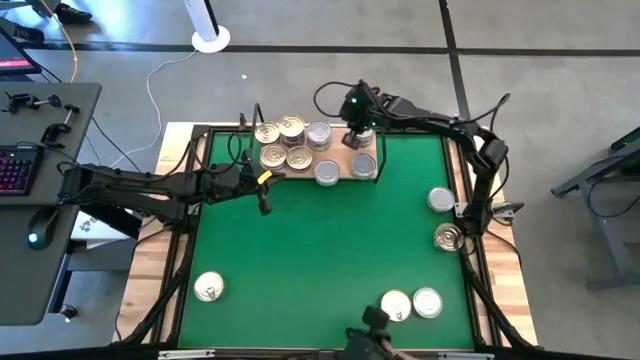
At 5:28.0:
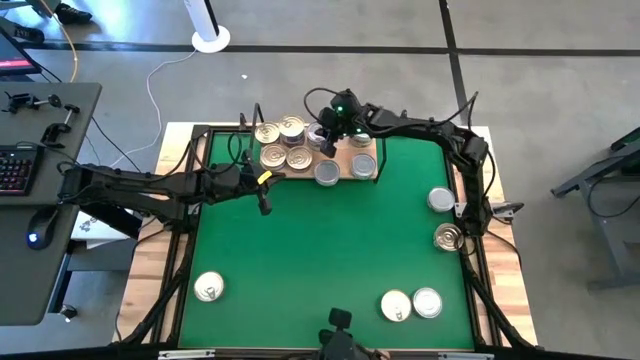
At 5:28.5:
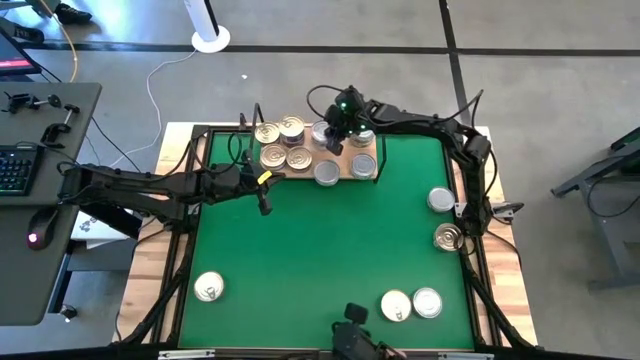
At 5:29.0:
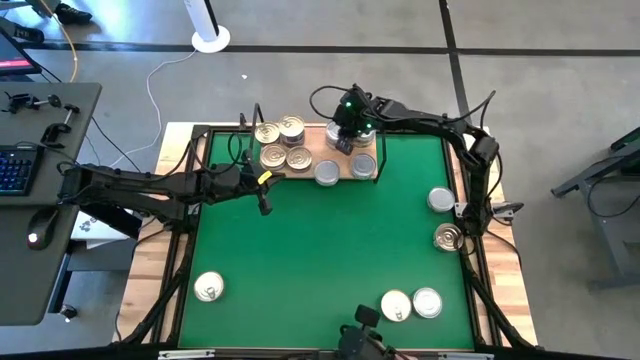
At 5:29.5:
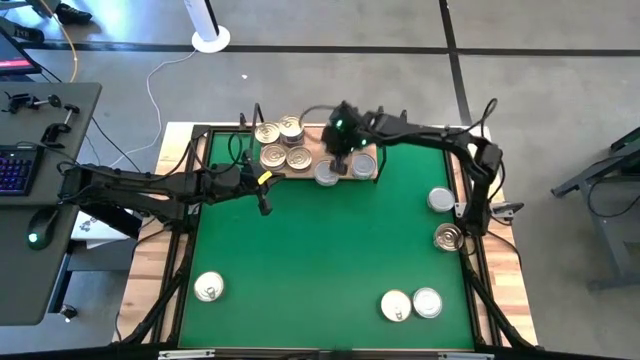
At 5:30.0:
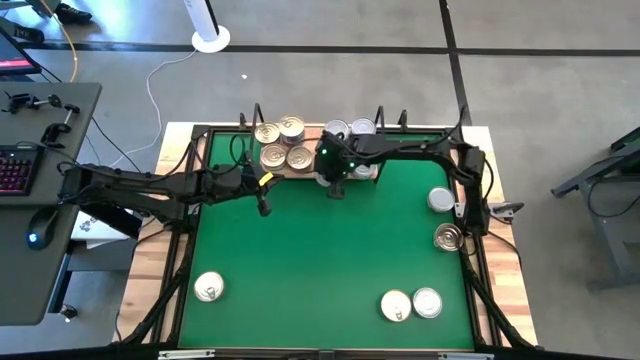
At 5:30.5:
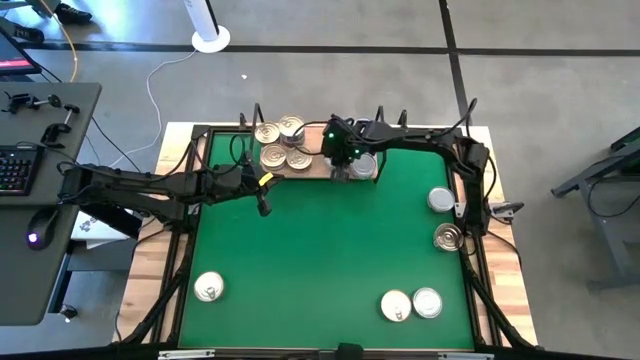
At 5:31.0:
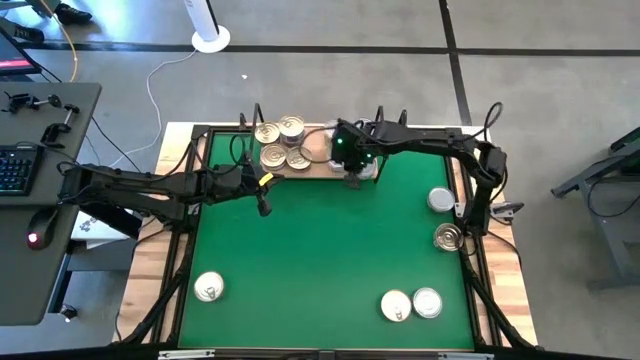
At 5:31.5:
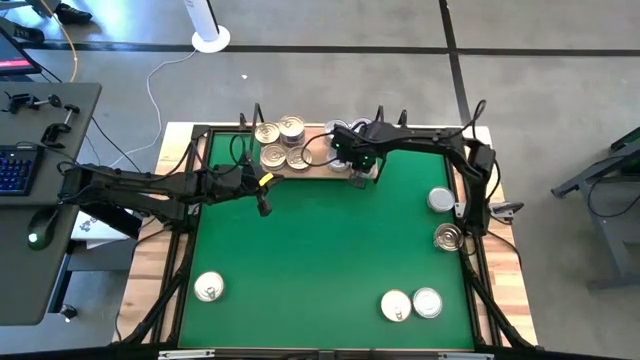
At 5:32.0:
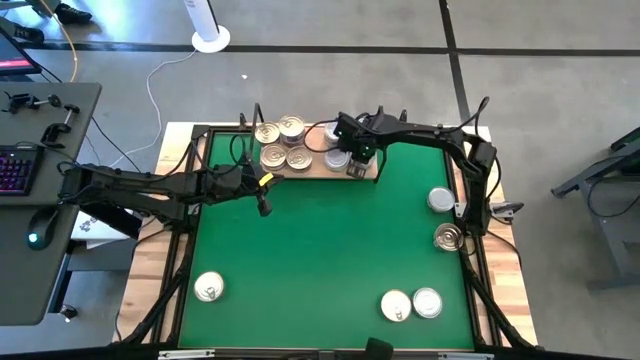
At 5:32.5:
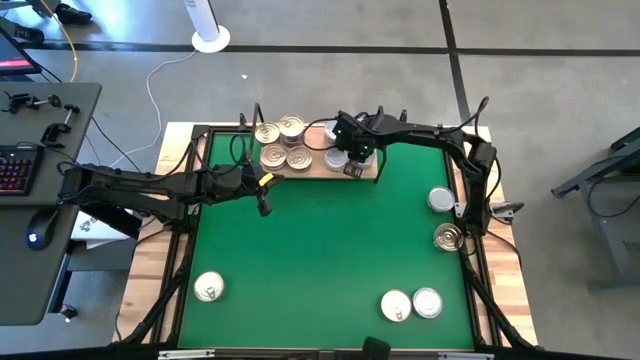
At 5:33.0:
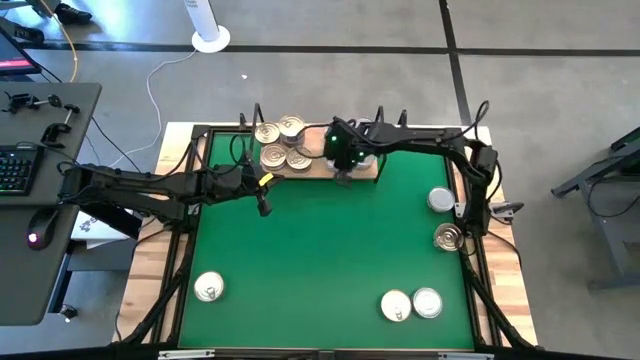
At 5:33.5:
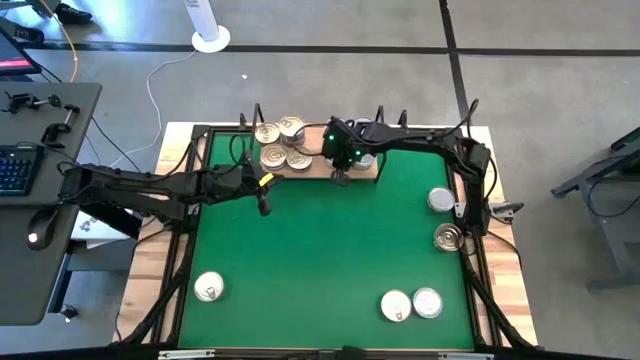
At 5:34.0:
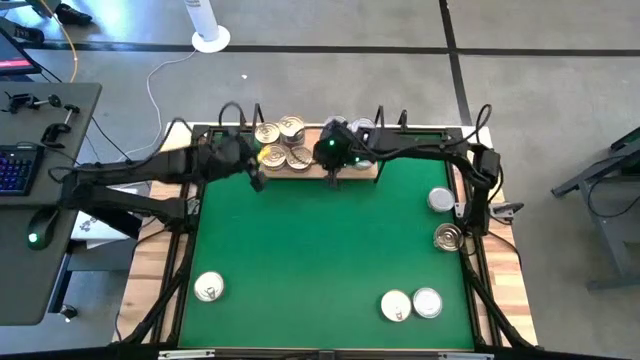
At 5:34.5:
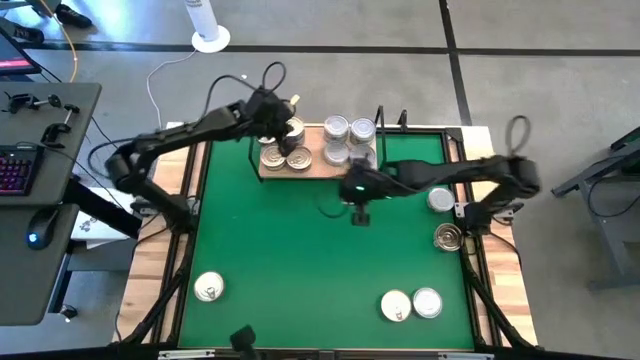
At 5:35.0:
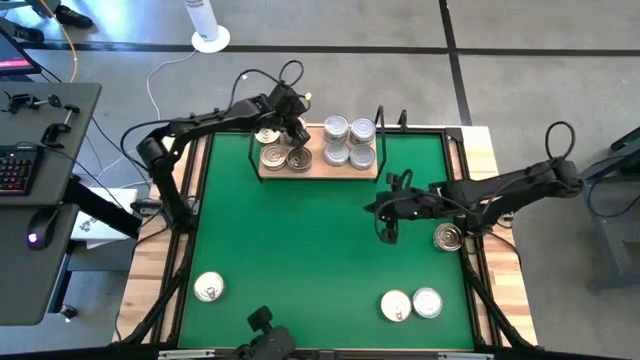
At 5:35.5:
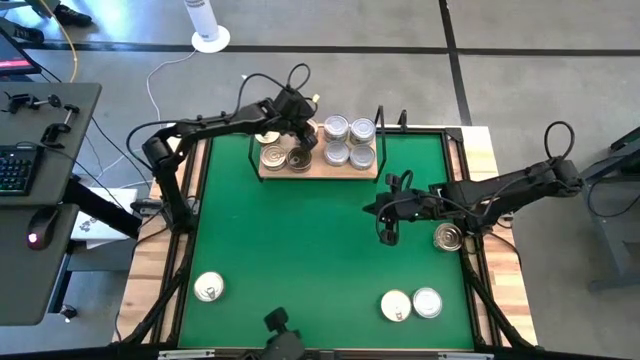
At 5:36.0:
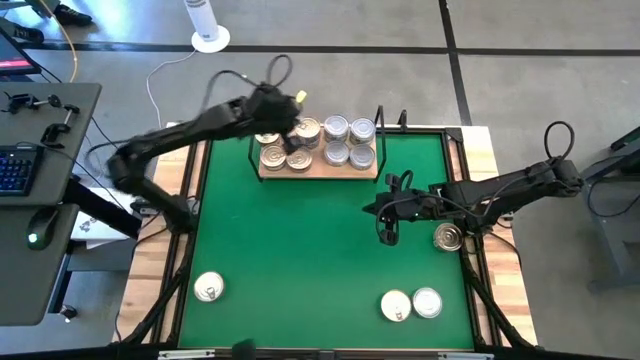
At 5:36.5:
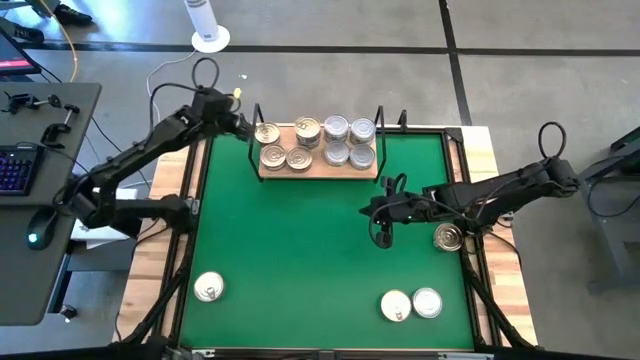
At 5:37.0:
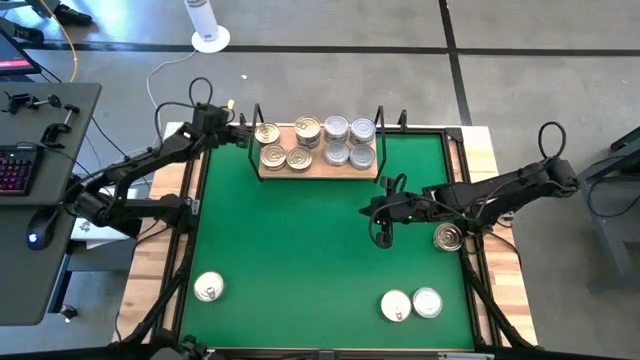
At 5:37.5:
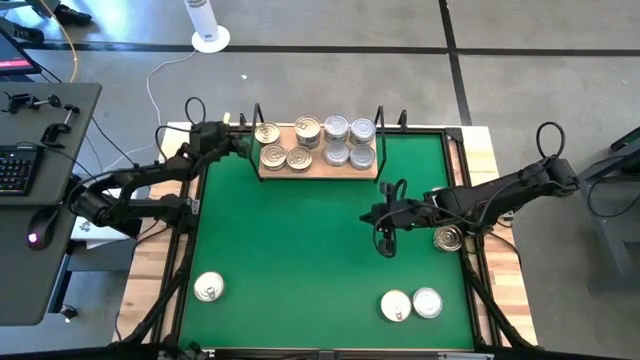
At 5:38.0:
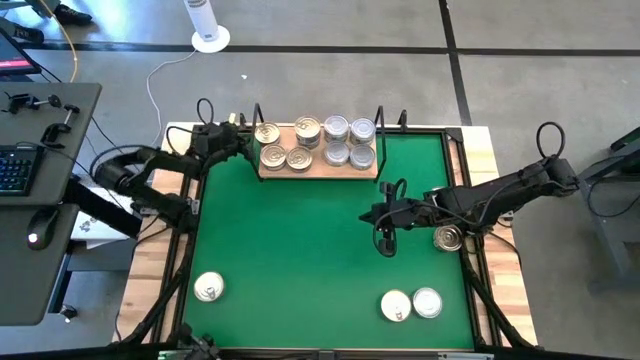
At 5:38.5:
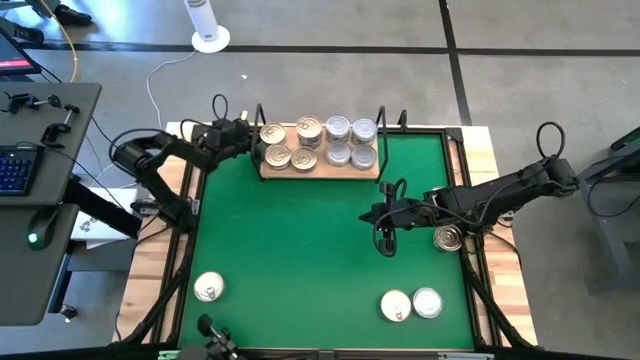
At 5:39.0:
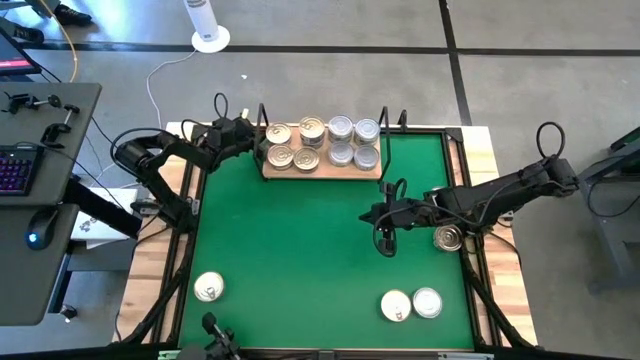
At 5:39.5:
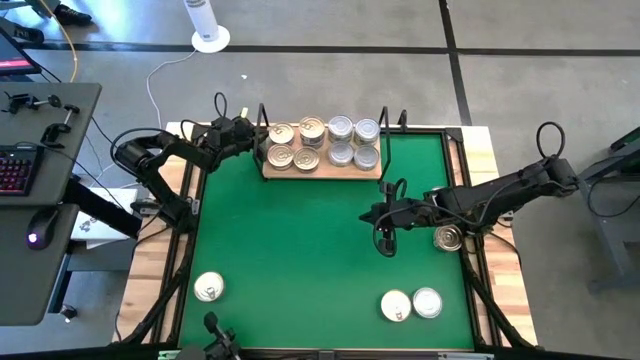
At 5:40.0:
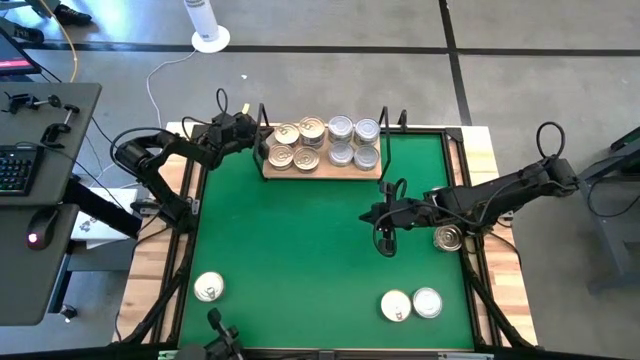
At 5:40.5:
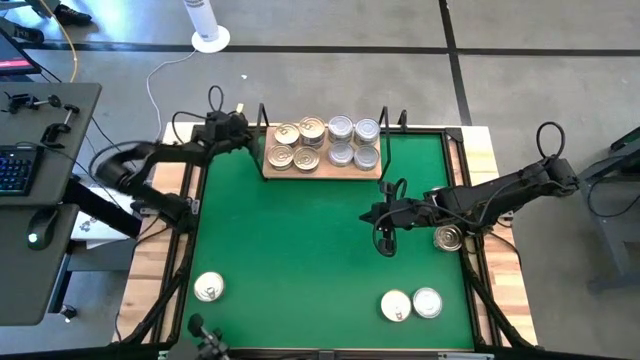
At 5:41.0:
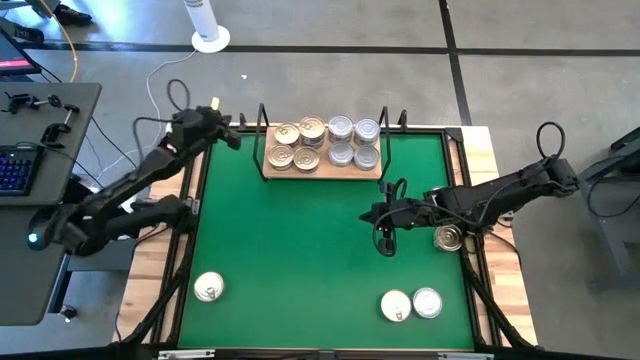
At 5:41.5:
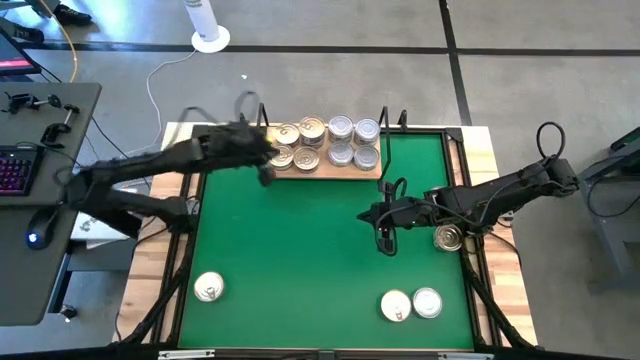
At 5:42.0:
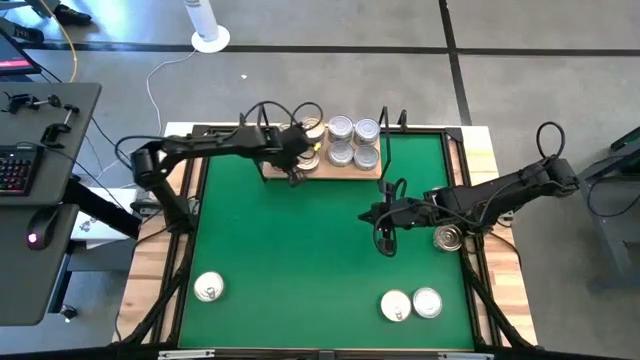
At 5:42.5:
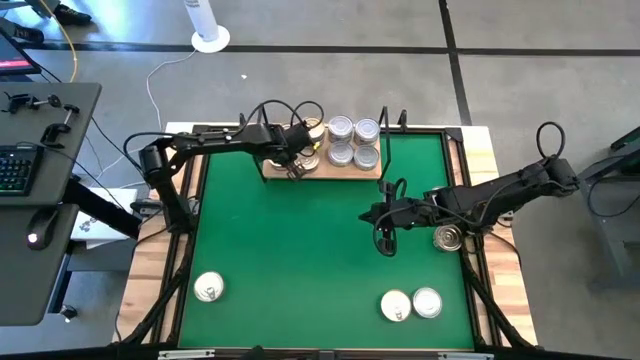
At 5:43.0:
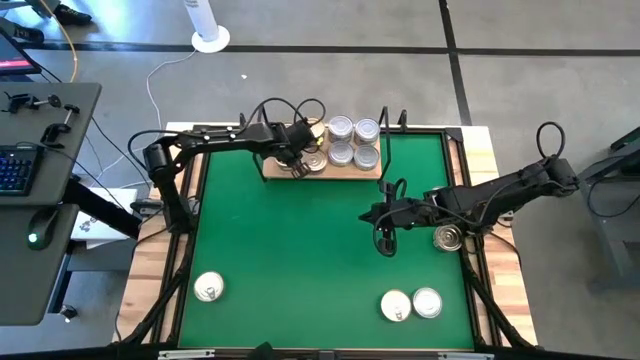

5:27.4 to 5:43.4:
Task: Stack canned seafood by type on shelf
Adjust the tuna cans on the shelf

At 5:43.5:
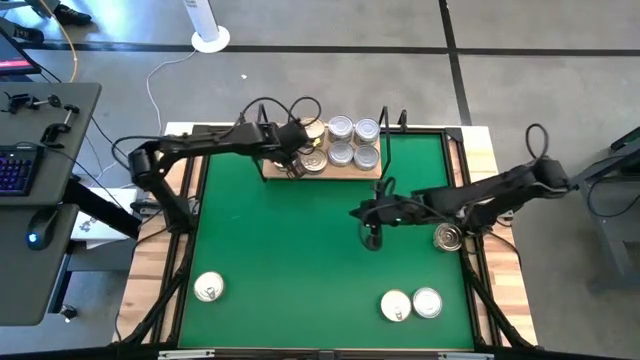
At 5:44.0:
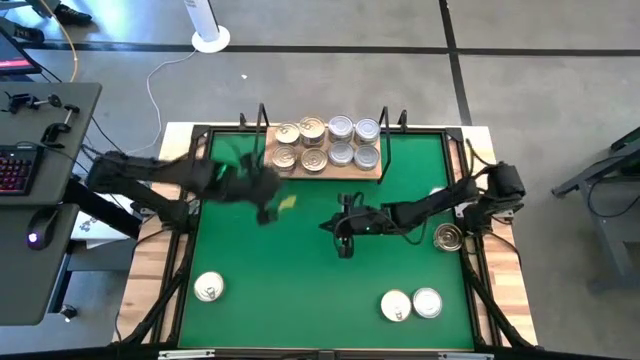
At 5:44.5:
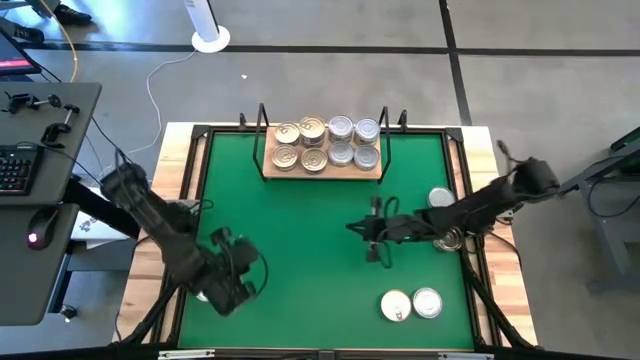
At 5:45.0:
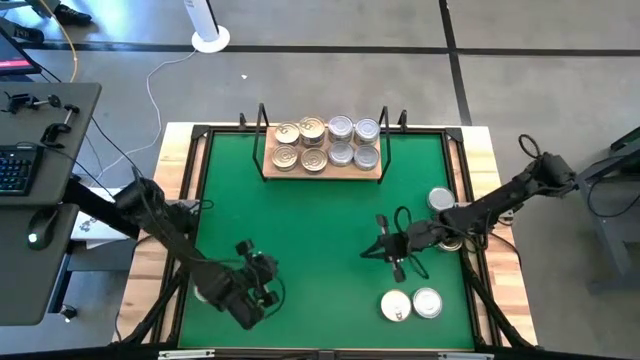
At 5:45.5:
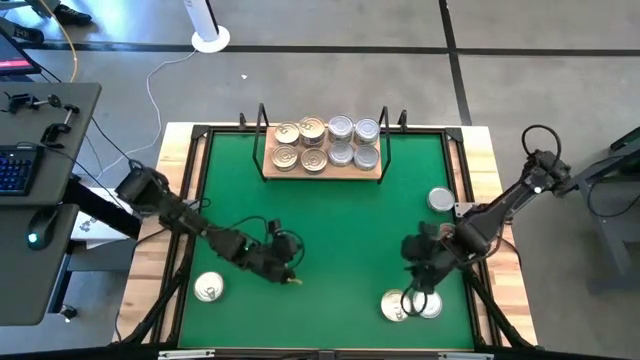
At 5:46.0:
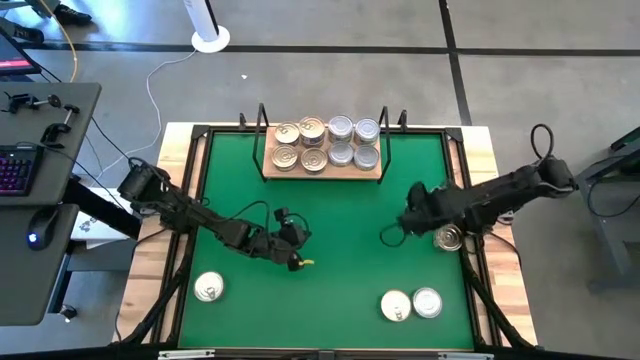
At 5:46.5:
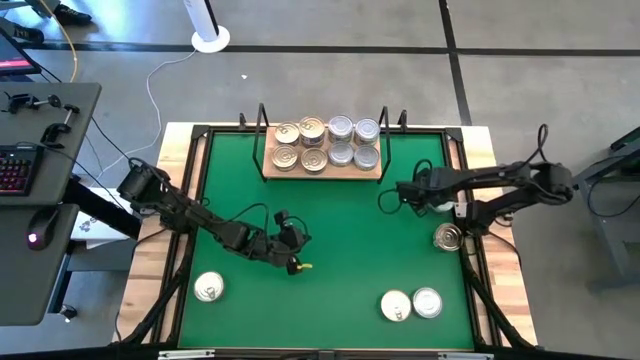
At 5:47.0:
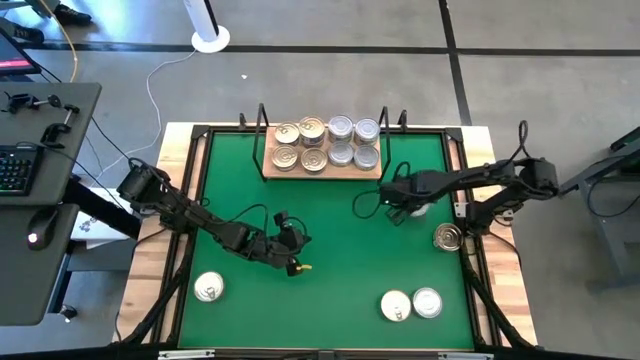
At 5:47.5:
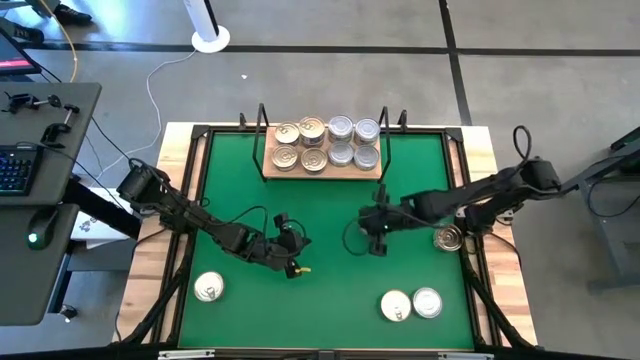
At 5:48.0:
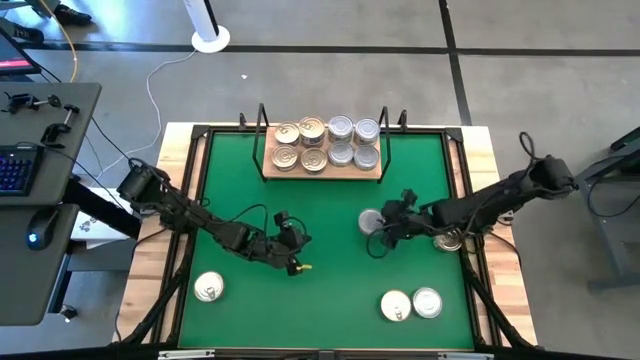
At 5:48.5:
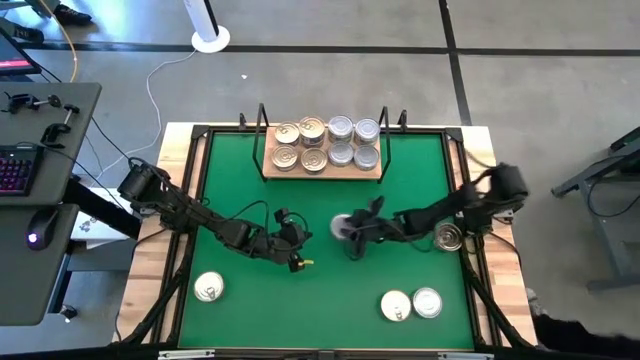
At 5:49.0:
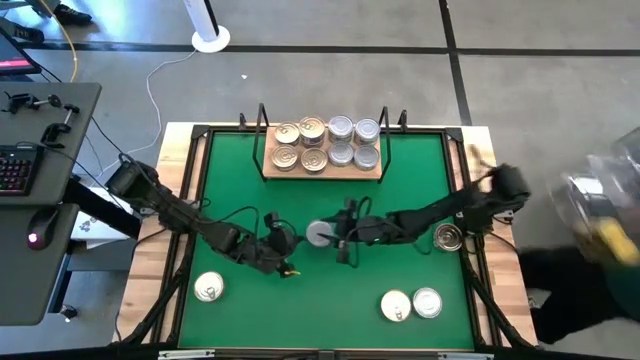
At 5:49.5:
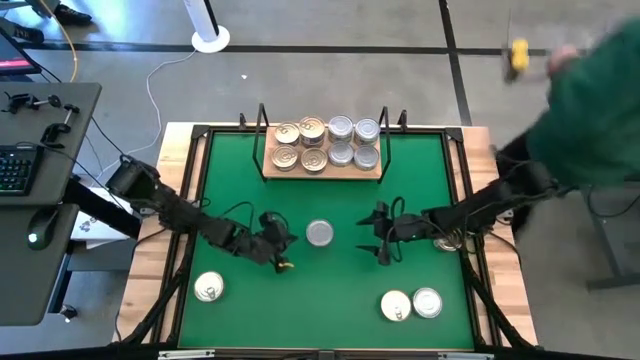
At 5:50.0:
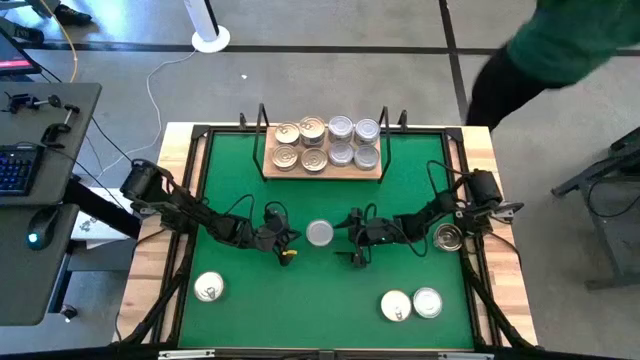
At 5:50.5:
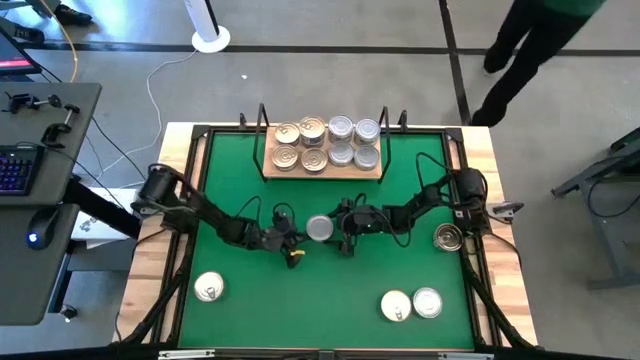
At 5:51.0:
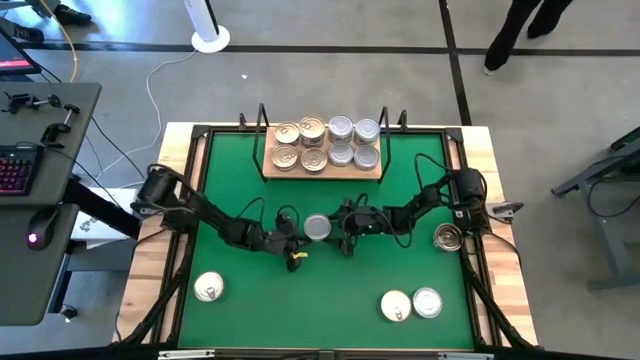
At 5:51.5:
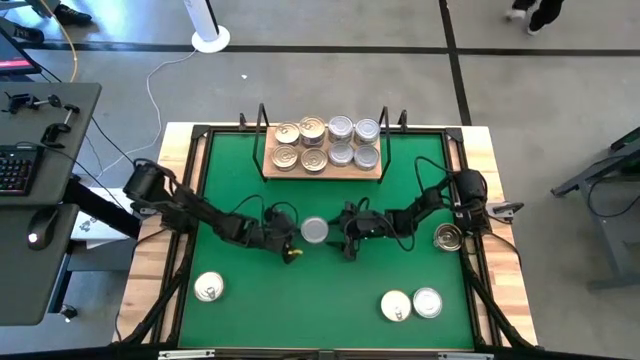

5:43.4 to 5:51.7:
Stack the green tuna can on top of the other green tuna can on the shelf
